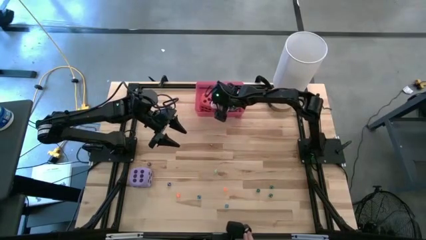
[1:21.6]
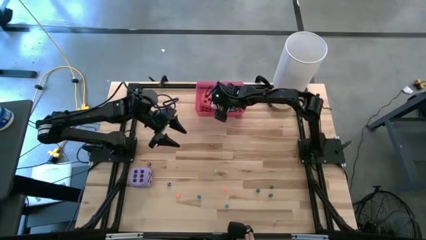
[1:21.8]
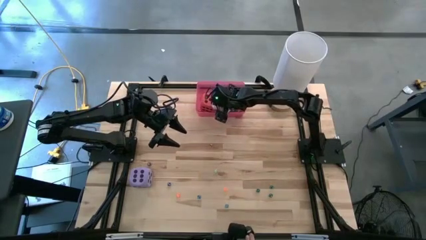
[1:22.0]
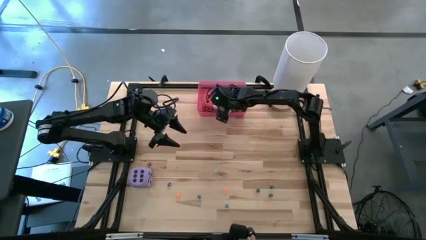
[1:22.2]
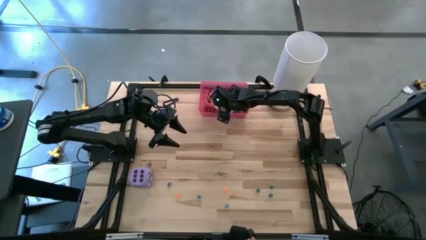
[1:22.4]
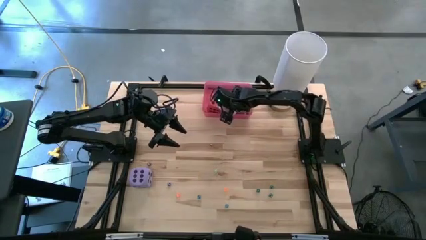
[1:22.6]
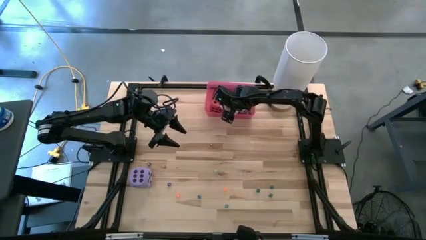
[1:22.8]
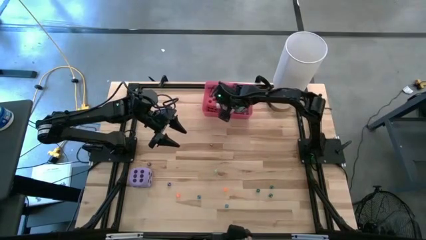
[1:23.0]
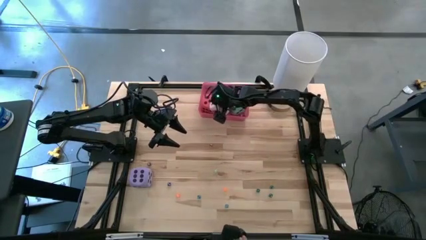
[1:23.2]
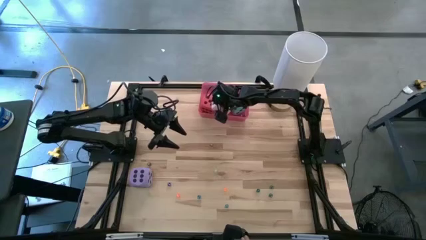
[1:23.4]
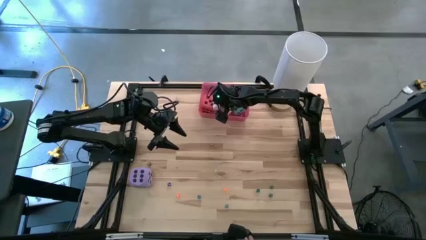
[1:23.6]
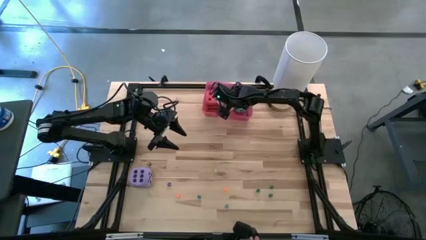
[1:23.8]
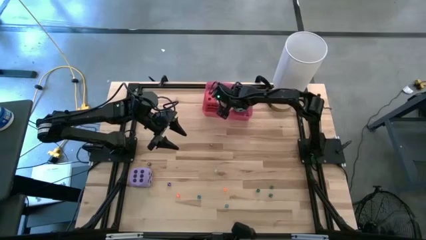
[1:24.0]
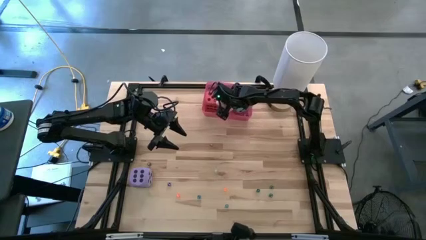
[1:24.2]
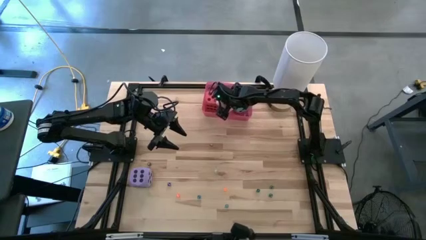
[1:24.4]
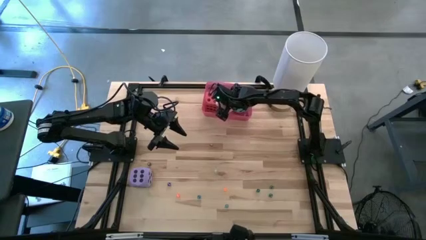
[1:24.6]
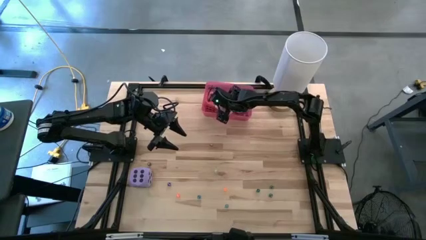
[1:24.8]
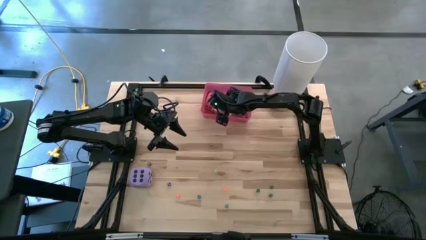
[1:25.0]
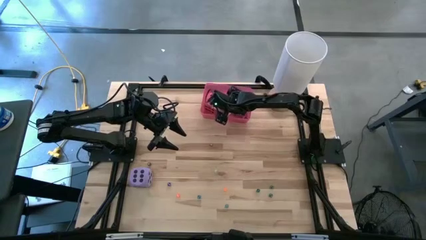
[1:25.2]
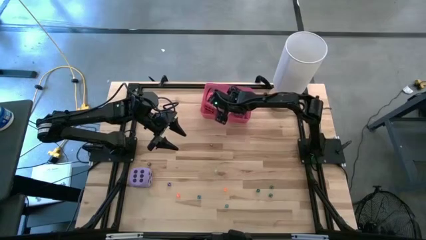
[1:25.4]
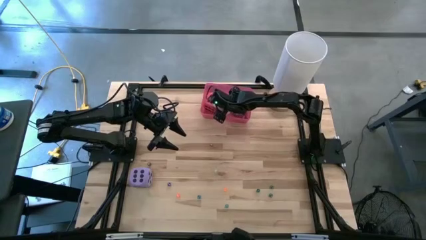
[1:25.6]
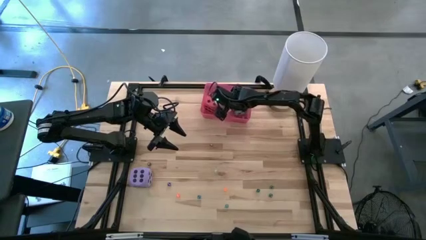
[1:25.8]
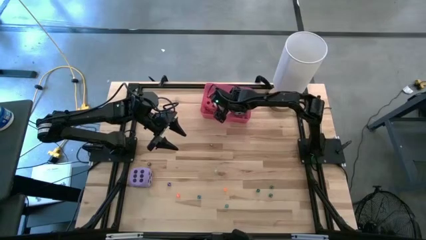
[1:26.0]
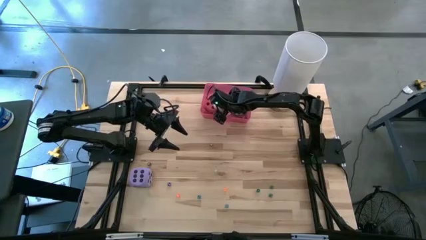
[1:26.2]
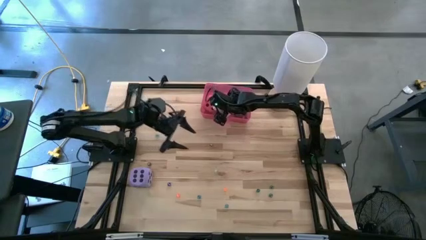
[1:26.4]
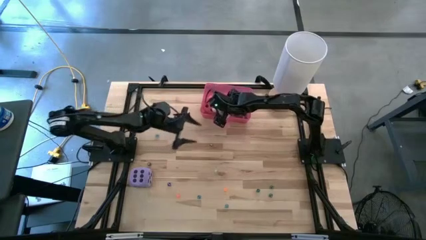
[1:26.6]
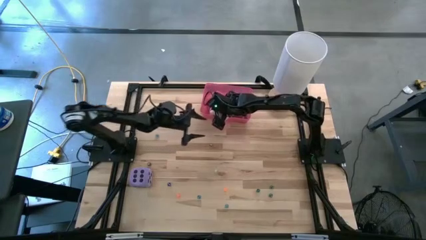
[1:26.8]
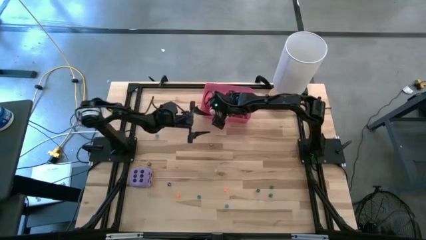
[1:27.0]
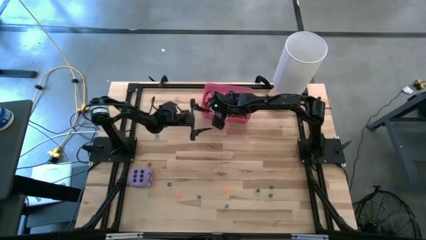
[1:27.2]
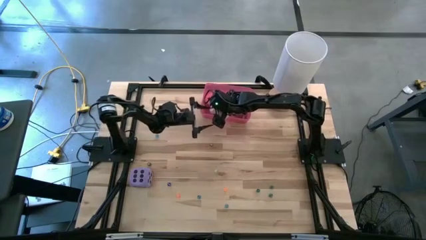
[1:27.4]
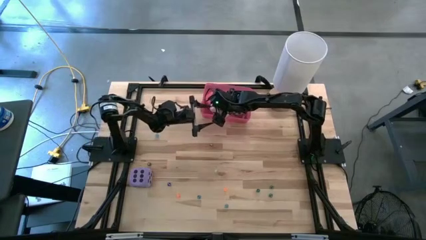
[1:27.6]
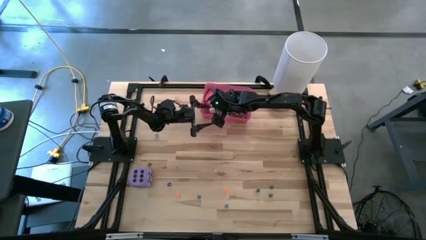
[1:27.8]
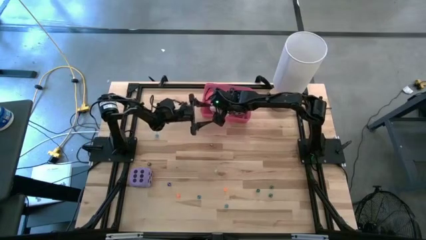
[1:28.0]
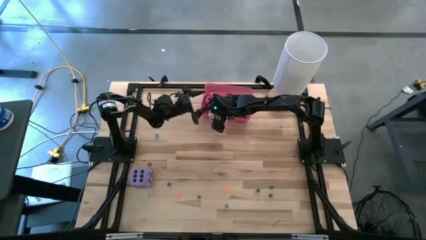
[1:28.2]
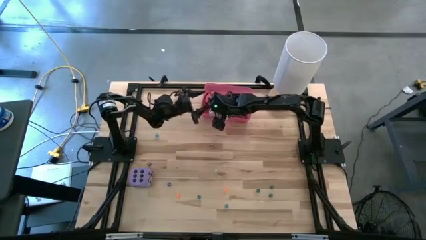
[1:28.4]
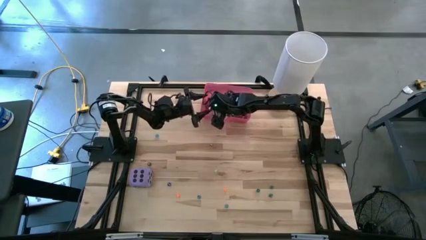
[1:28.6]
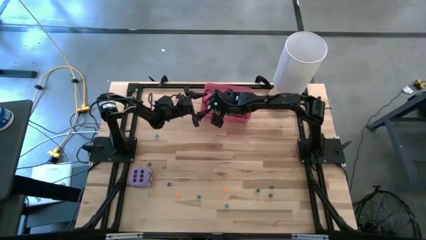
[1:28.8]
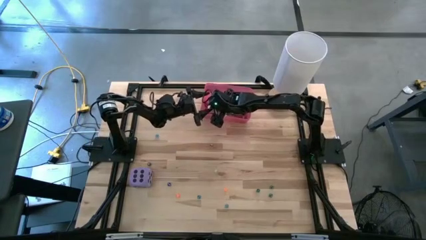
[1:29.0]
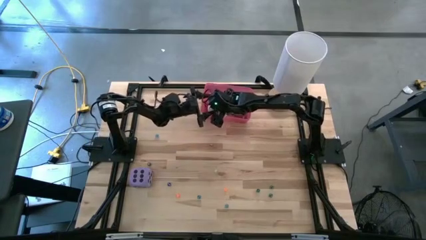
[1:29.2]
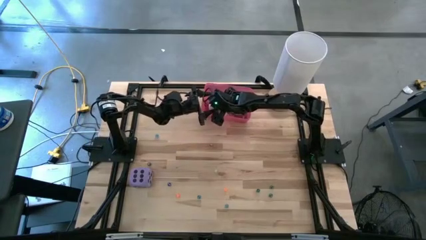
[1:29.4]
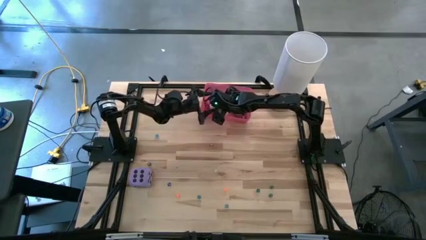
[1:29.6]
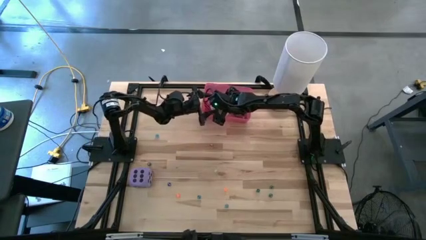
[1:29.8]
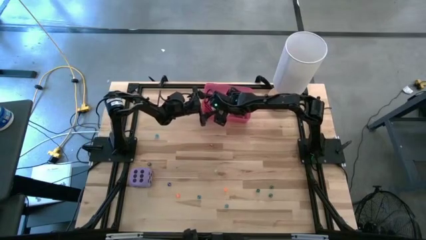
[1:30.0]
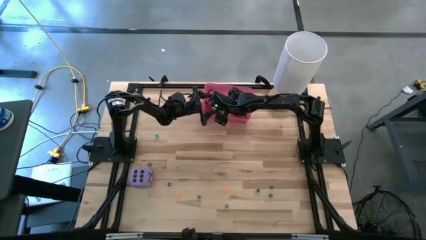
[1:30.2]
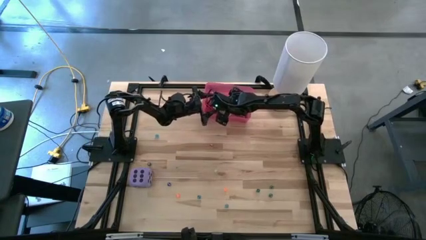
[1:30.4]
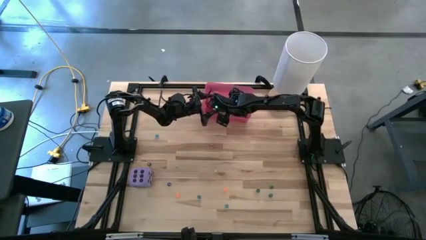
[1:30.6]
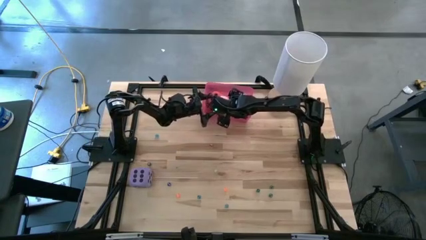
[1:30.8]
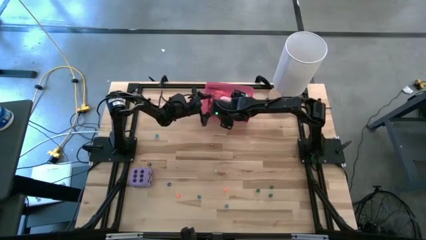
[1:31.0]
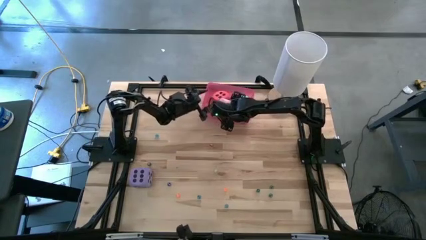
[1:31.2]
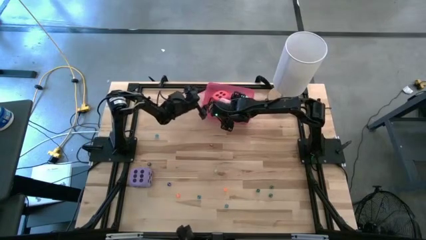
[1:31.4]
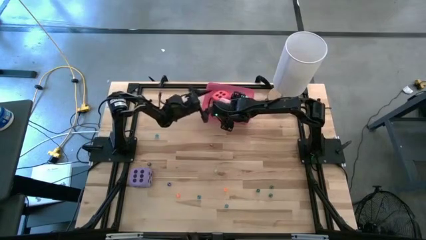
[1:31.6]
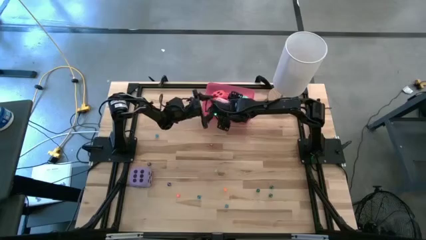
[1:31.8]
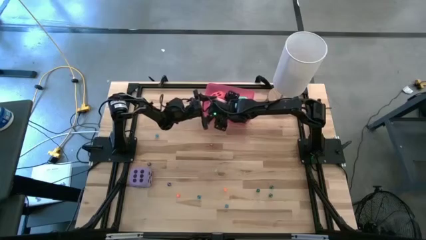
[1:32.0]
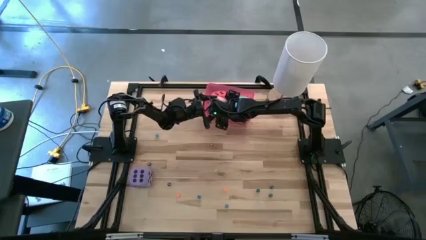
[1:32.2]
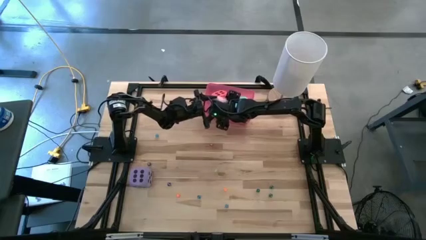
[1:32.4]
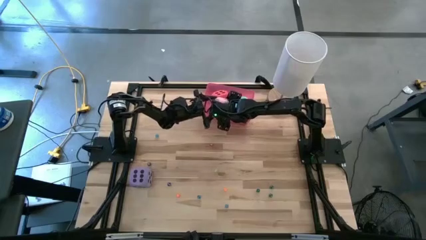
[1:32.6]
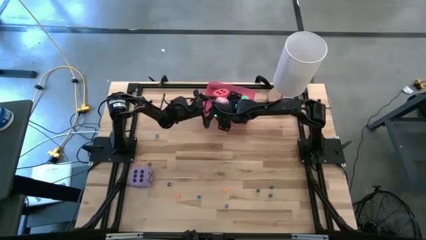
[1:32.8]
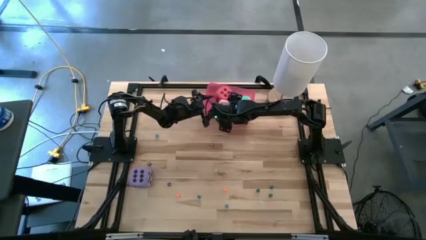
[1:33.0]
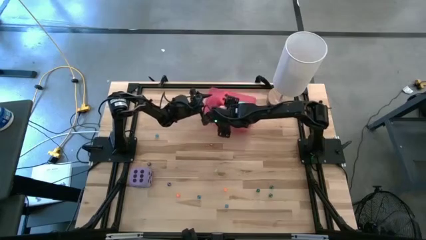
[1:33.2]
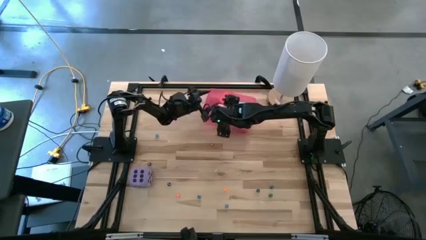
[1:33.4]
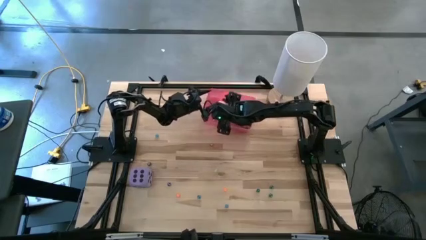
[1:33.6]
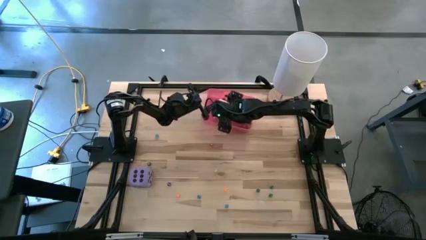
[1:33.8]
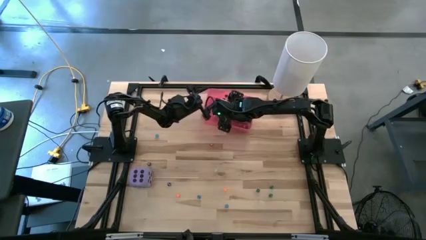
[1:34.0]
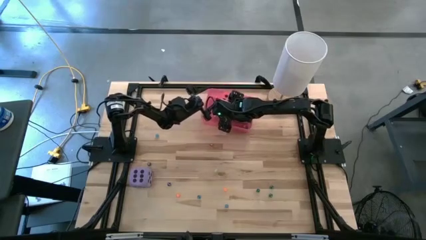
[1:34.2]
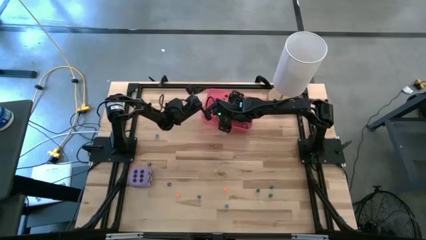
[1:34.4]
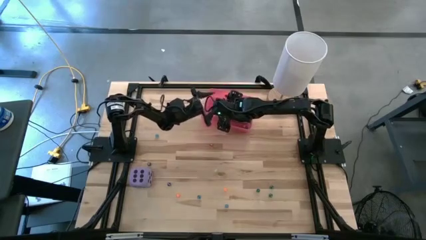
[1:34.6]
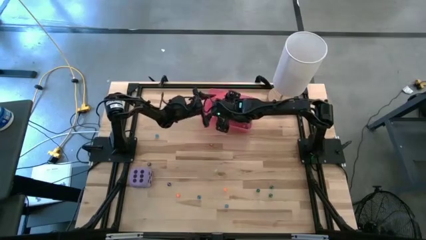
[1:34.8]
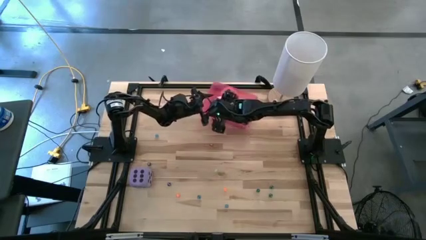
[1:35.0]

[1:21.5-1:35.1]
Task: Pick & Place Dice
Put the large pink dice into the pink bin
